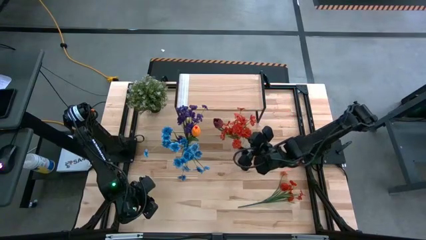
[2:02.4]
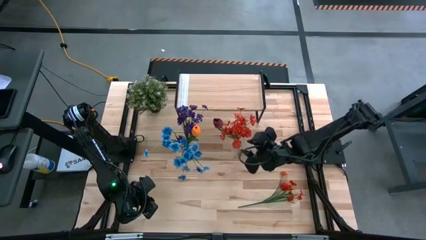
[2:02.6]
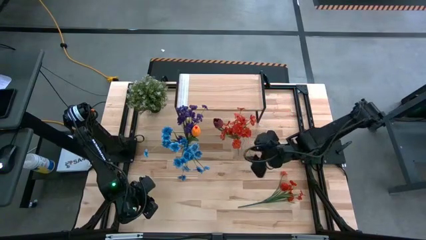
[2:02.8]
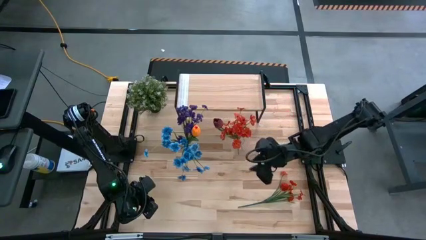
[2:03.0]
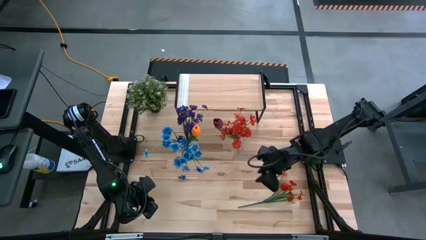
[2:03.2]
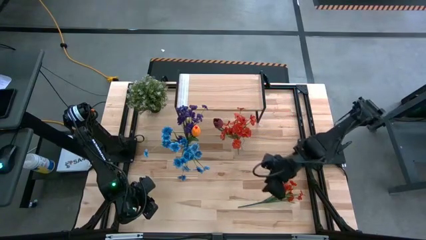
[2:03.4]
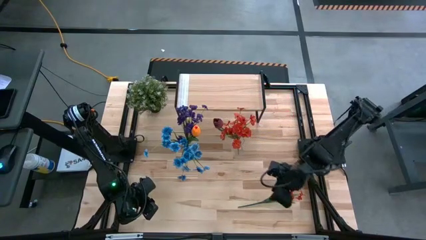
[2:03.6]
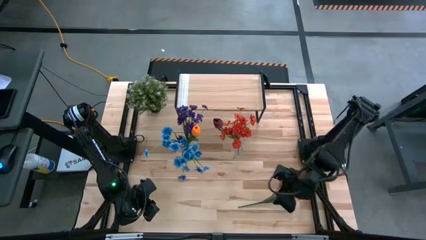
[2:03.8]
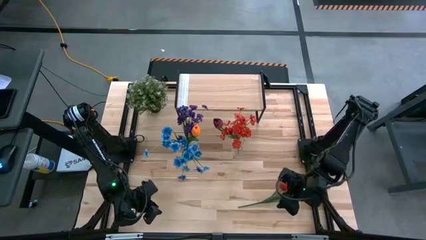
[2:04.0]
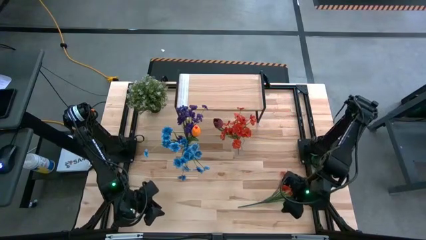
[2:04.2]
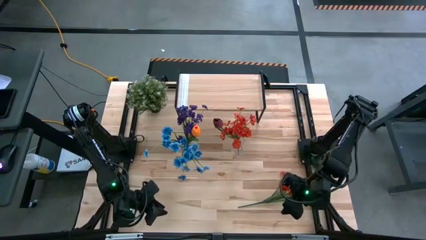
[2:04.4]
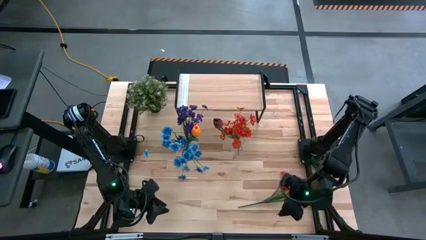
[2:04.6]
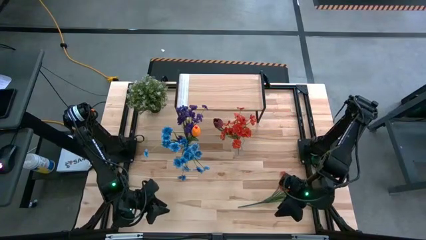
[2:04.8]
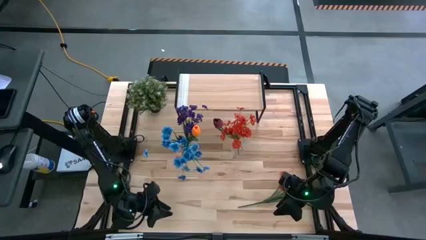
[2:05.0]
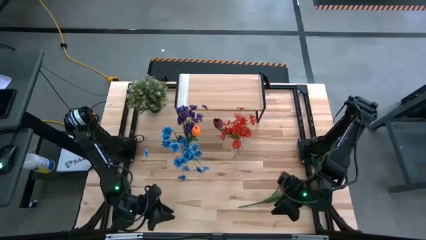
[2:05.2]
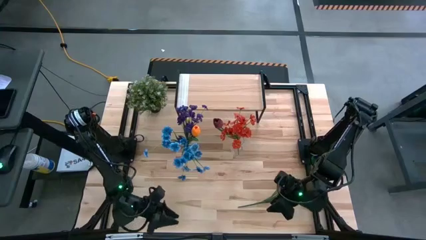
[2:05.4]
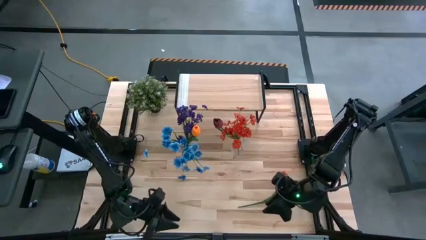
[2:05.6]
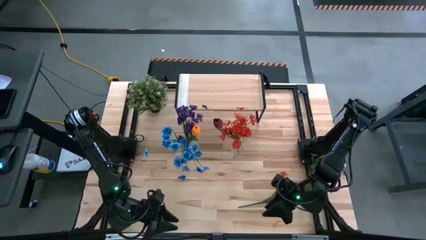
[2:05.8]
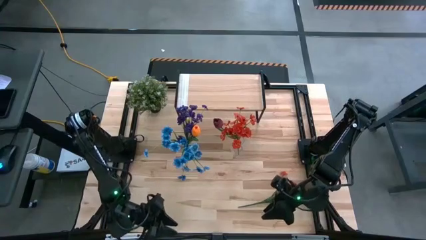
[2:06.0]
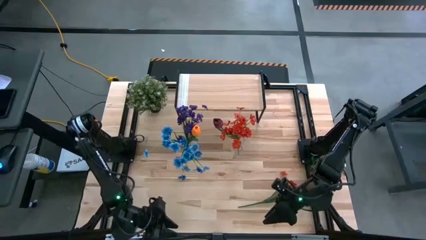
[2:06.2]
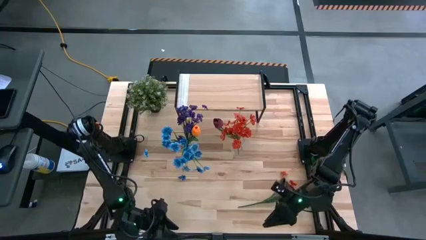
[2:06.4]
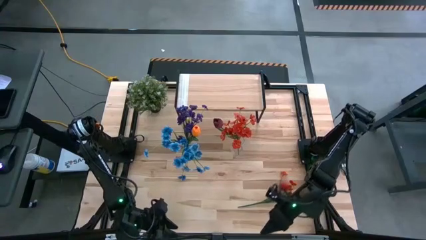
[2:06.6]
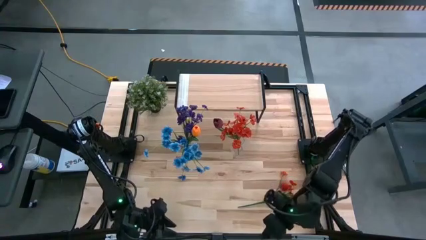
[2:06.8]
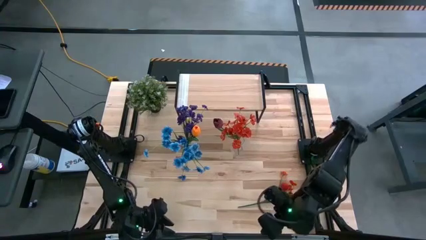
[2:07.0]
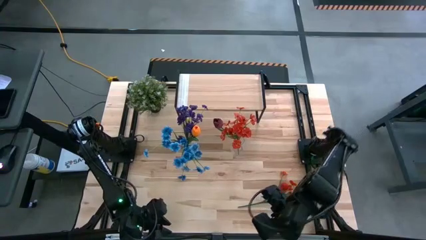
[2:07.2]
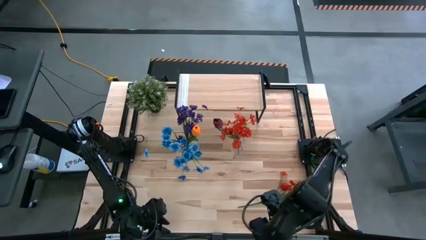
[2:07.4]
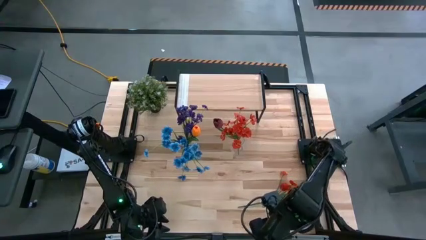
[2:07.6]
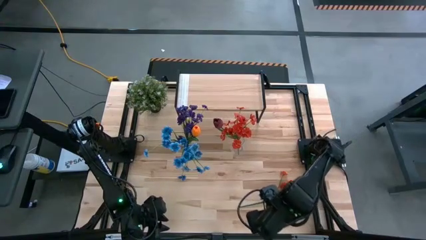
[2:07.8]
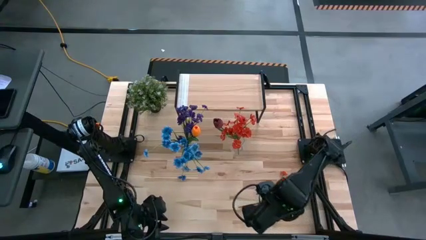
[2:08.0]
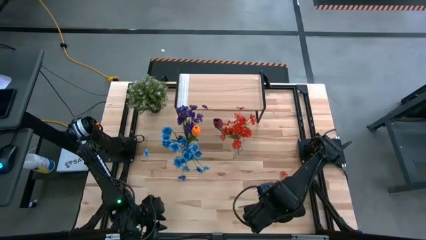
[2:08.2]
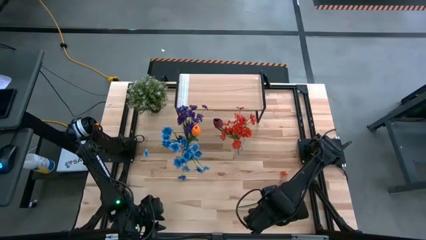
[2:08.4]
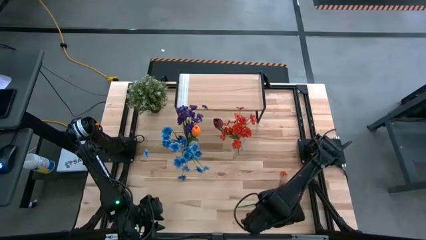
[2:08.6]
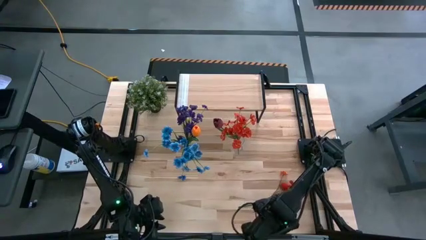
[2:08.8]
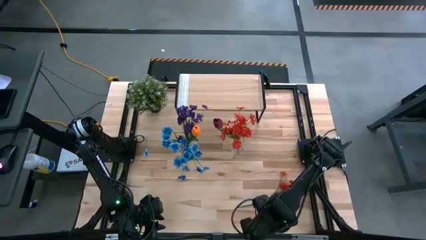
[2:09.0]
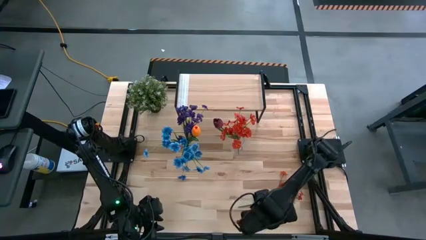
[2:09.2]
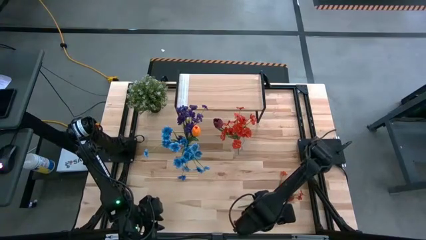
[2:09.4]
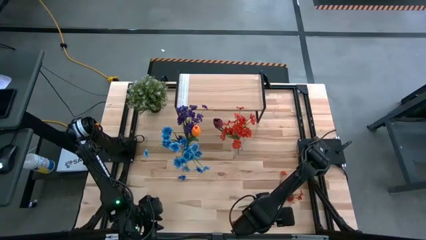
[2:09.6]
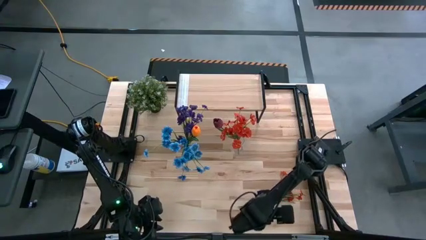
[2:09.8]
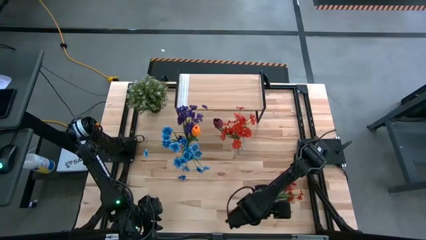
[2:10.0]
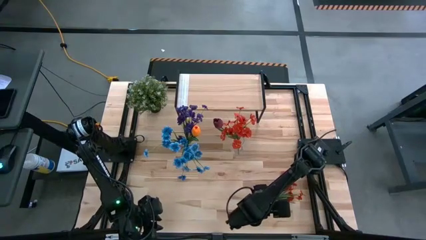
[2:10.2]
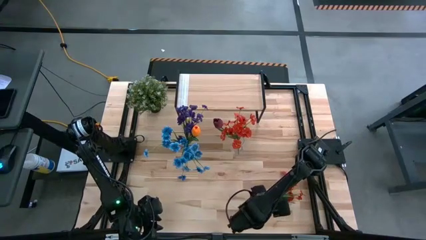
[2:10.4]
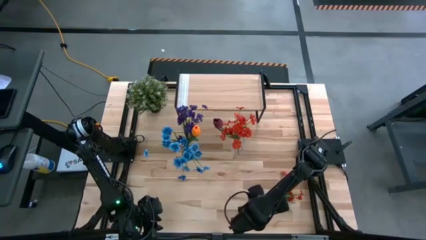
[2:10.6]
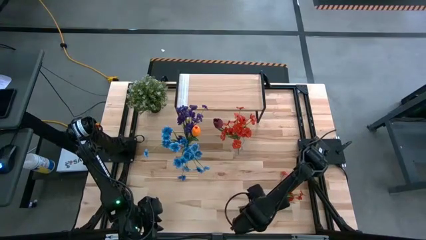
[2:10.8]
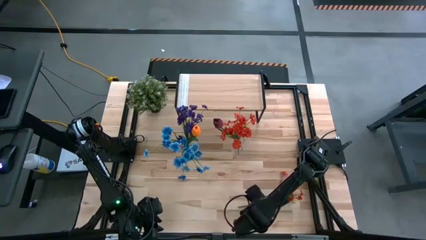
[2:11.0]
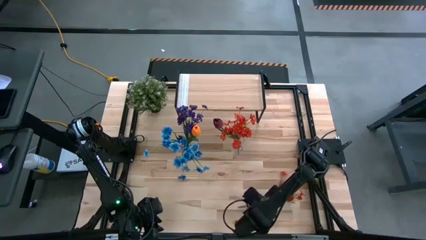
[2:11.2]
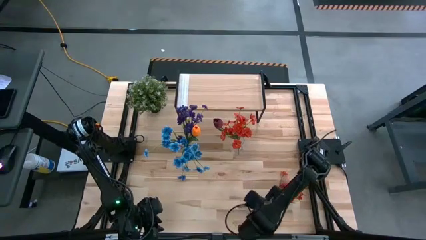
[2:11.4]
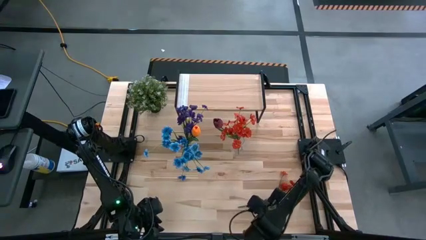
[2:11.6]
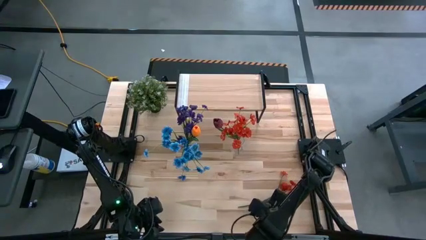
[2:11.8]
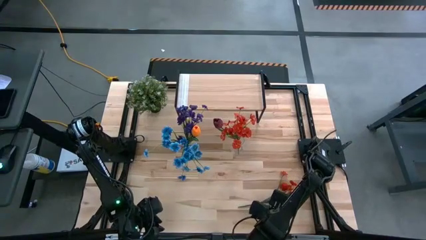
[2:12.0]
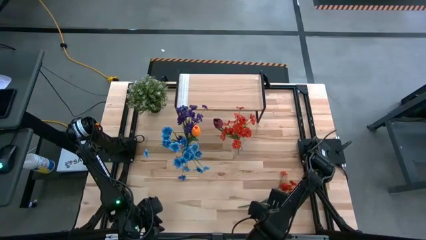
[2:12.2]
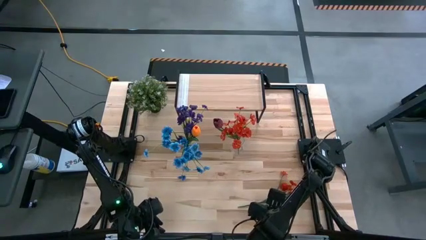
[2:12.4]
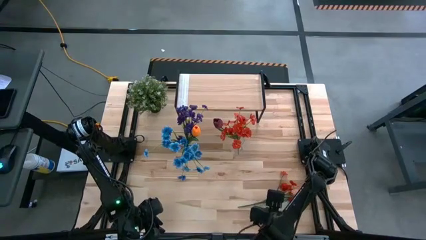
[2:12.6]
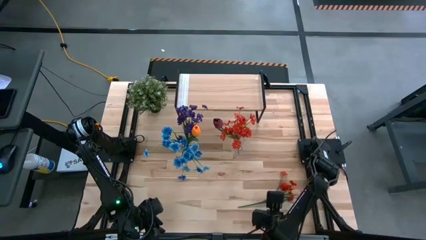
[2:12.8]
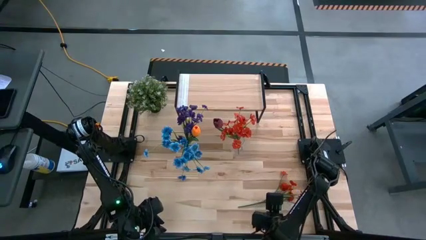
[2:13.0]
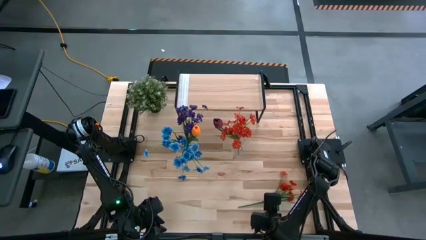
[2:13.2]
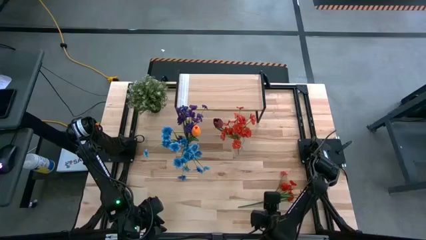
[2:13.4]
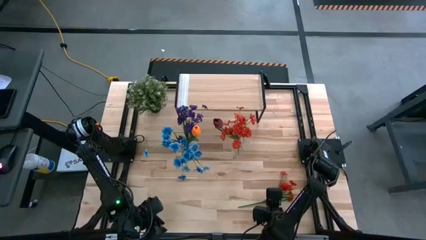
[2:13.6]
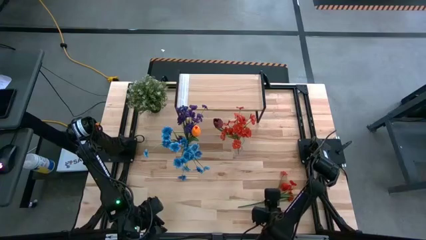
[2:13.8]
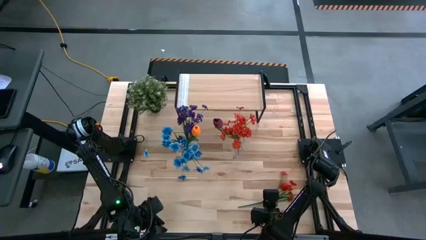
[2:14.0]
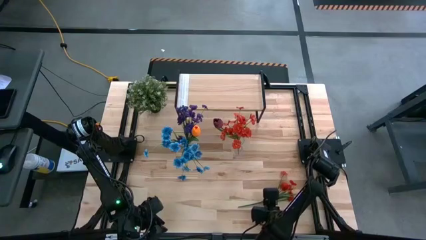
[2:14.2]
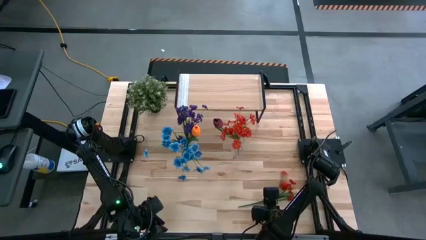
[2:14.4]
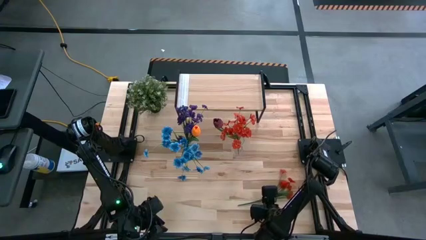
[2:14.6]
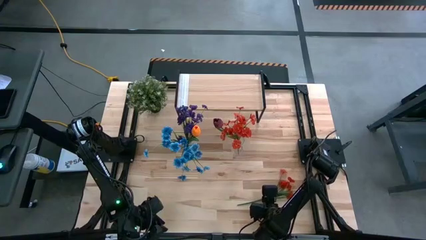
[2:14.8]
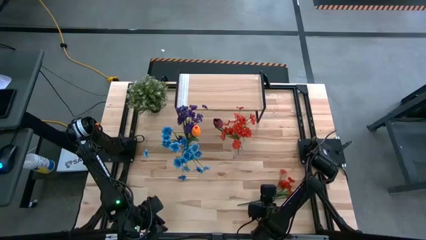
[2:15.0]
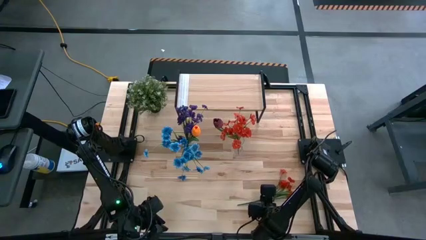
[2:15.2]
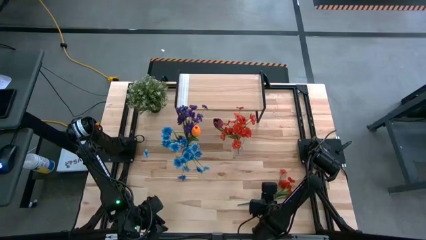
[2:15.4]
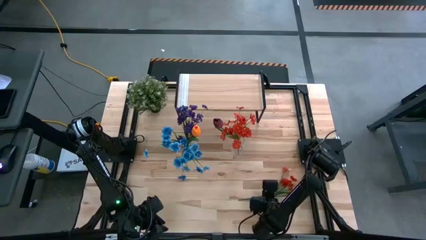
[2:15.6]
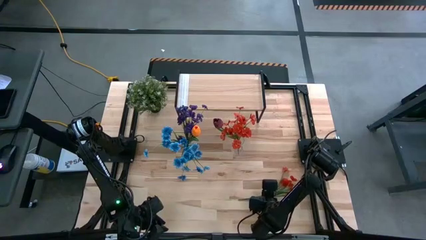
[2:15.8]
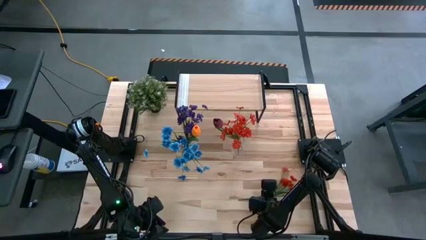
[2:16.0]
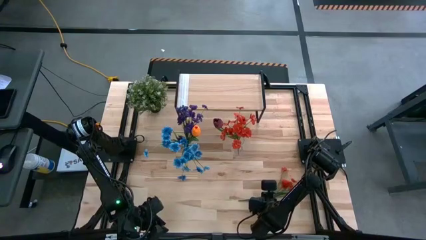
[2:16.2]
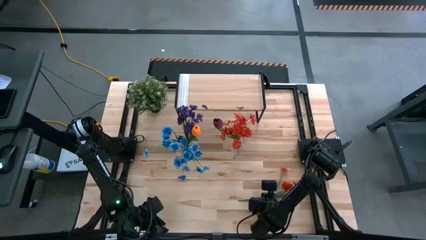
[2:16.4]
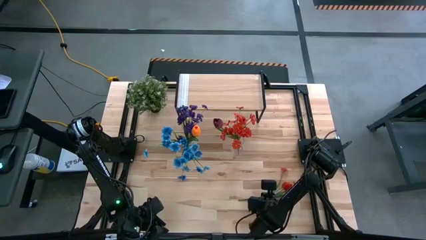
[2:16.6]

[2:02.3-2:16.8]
Task: Pick and place flowers into a vace then onto a shelf
Put the red flowers into the right transparent vase
